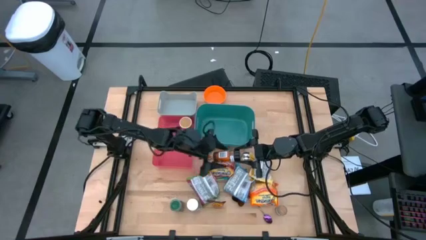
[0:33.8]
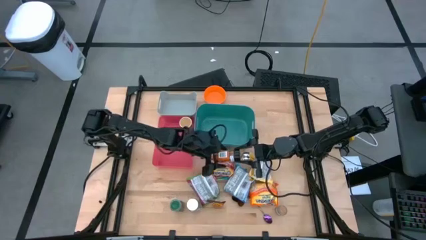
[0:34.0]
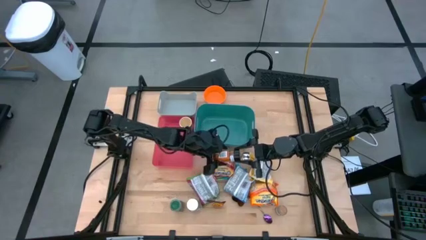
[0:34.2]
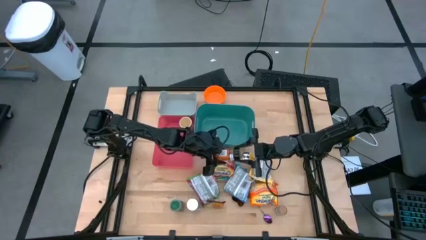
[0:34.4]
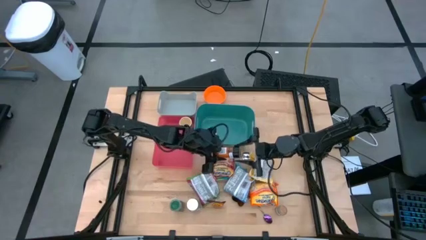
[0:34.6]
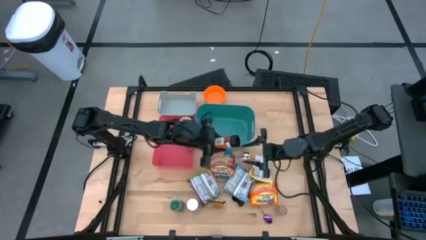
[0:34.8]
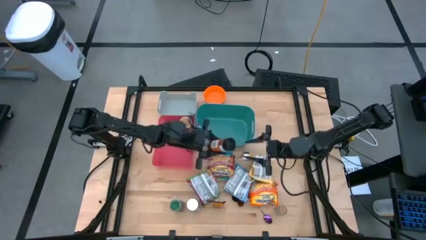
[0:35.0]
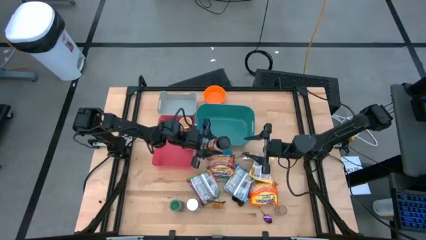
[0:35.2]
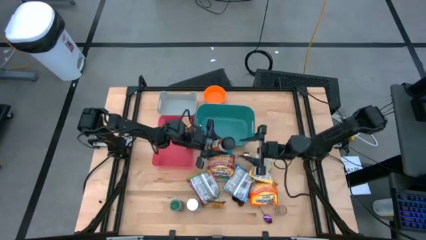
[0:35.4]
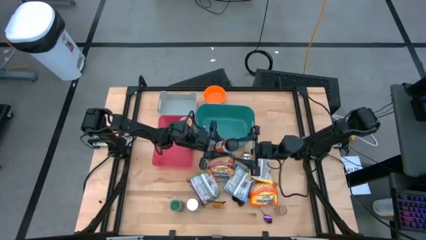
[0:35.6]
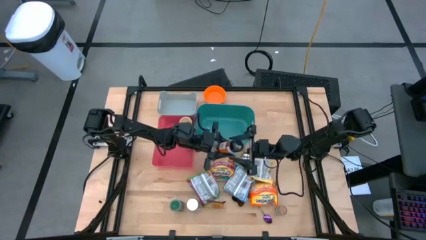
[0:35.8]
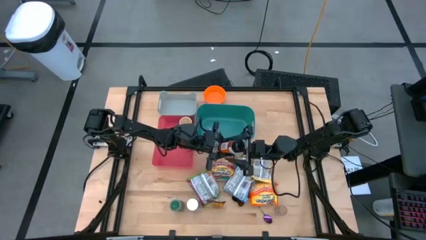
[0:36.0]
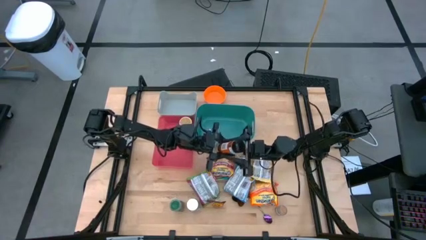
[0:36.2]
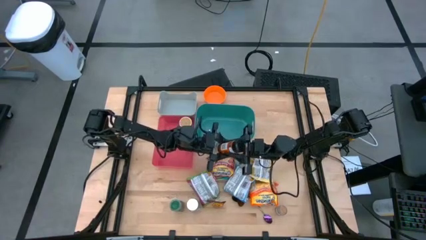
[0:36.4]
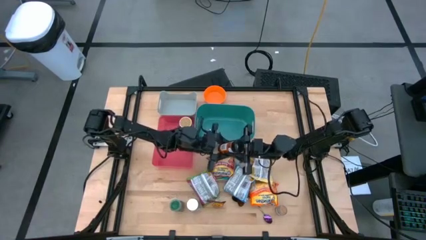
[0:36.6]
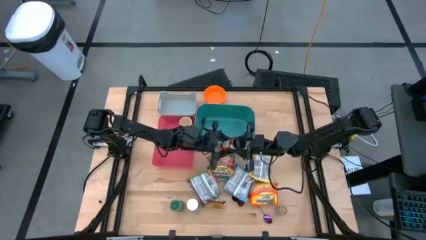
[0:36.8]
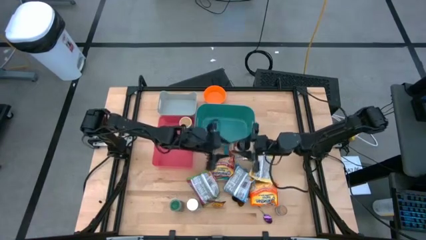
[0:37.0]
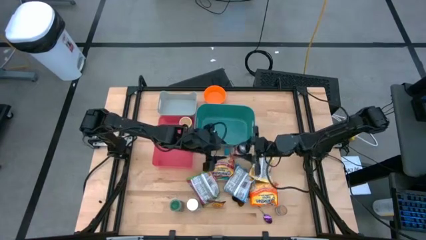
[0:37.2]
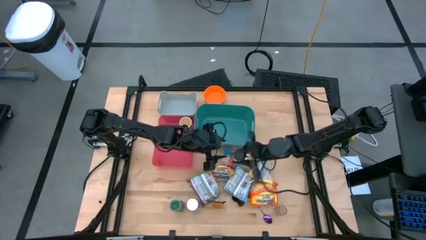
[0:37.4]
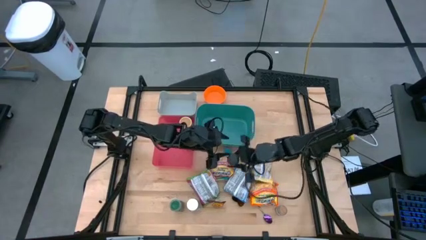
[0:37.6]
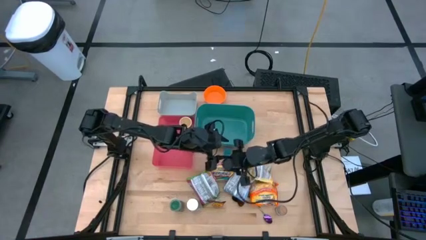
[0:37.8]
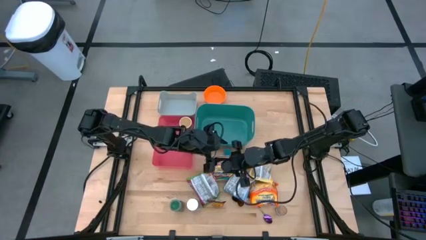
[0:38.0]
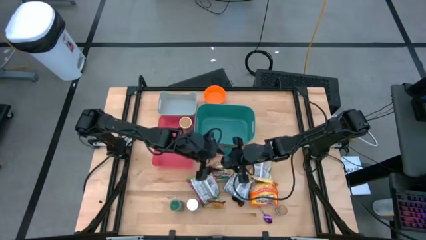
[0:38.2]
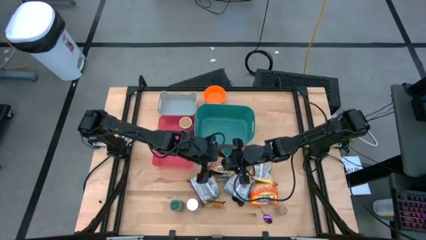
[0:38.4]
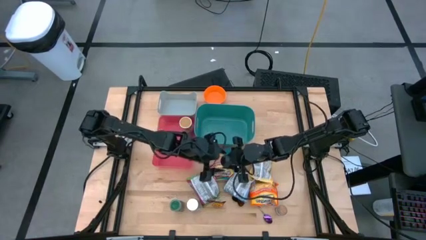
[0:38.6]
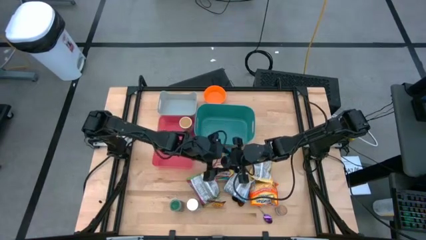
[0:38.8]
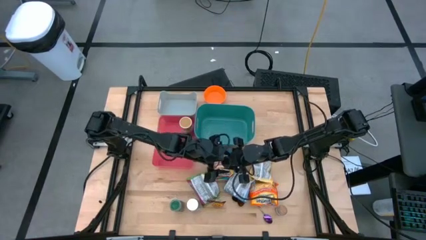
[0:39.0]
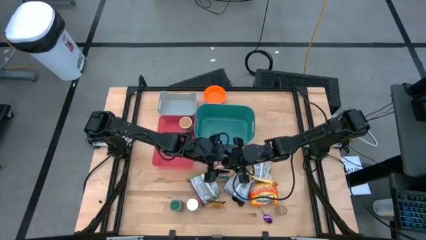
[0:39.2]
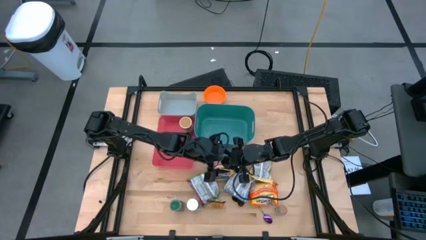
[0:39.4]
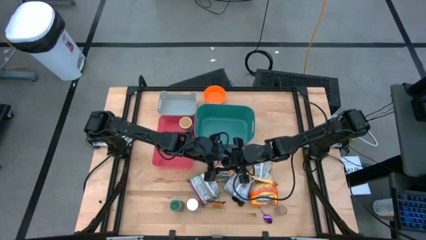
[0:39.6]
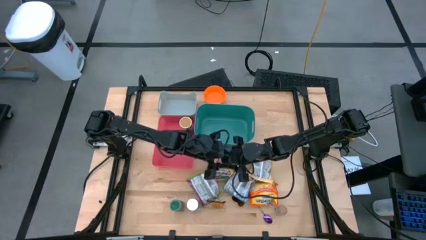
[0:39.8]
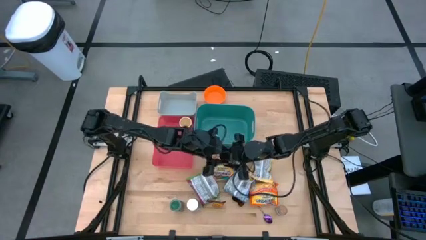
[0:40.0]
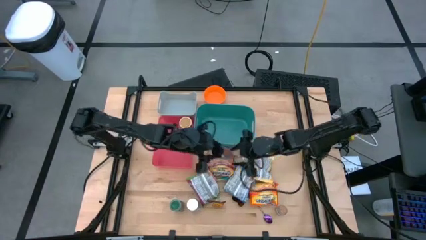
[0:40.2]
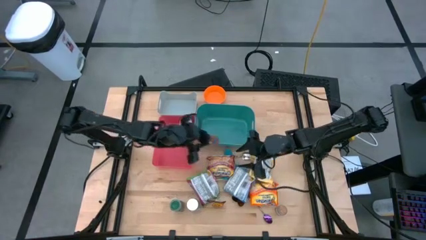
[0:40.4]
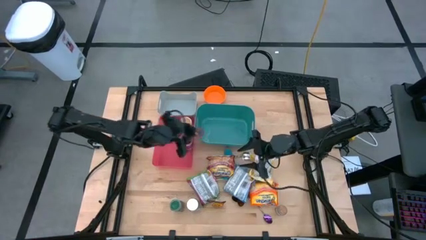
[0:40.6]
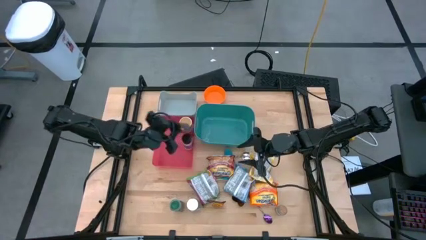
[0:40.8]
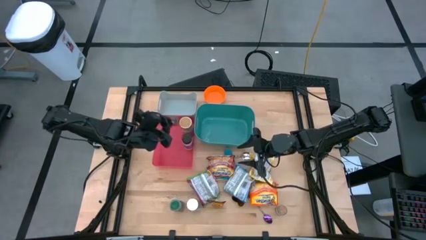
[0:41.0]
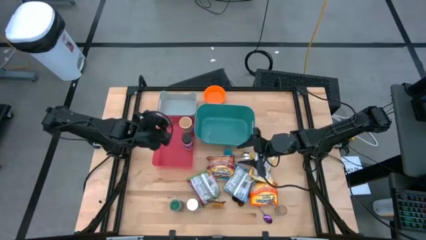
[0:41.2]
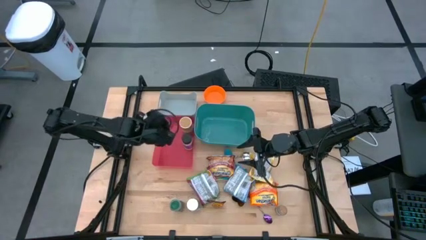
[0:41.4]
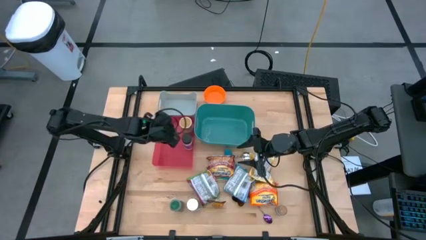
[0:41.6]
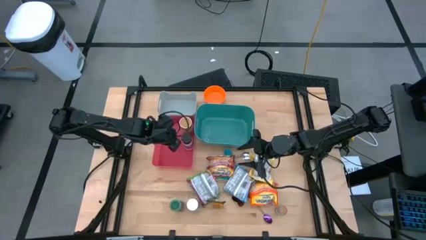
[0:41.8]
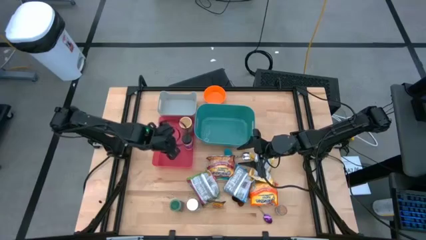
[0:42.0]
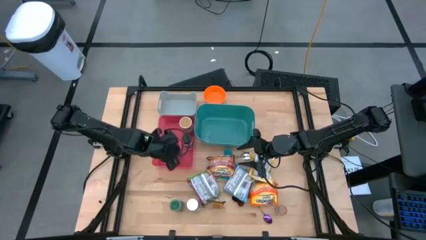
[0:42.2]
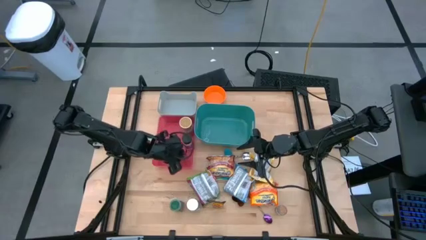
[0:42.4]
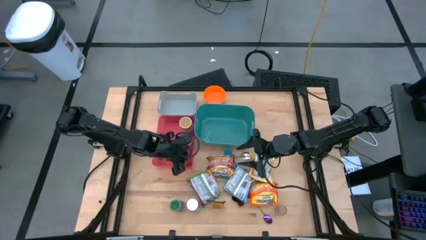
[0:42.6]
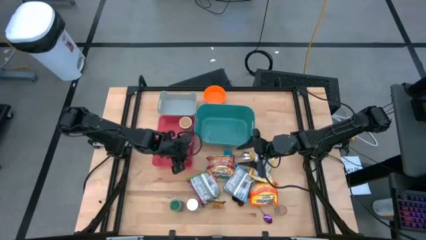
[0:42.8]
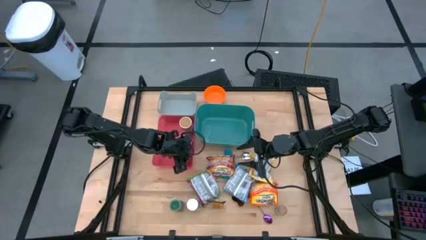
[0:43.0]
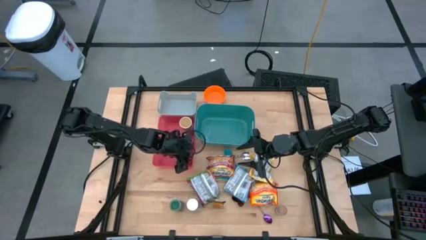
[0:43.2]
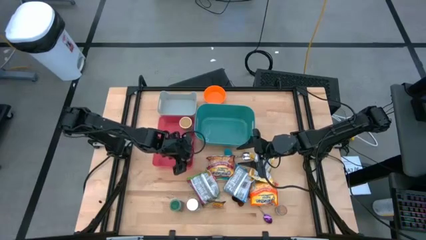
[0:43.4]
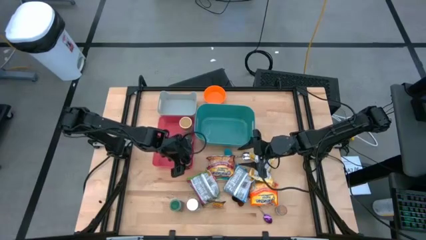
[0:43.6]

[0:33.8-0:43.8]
Task: Pick & Place Food Item
Put the orange spice bottle into the red bin

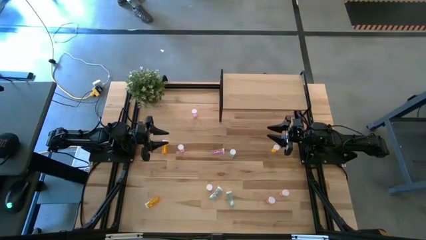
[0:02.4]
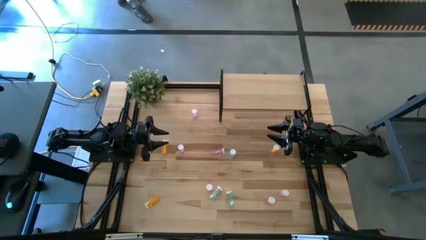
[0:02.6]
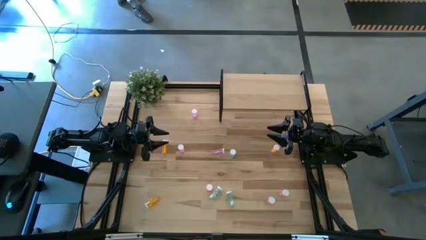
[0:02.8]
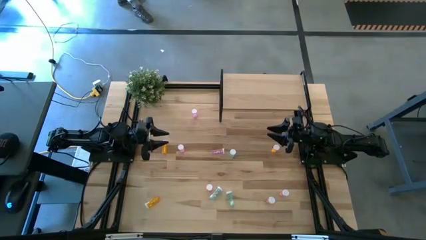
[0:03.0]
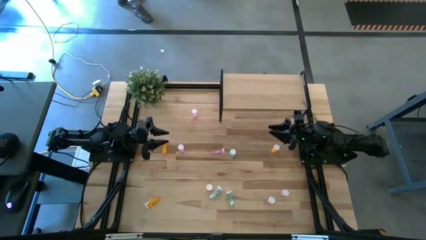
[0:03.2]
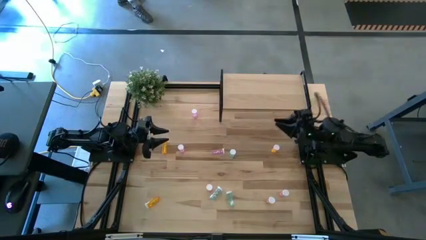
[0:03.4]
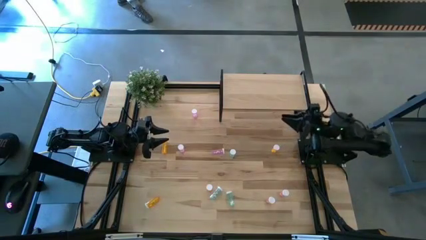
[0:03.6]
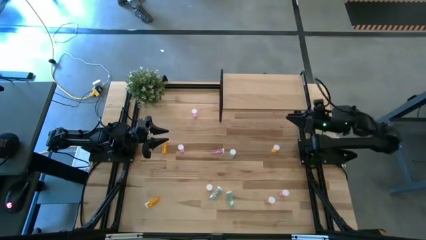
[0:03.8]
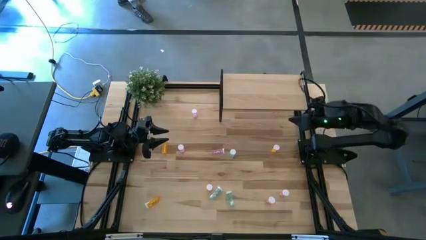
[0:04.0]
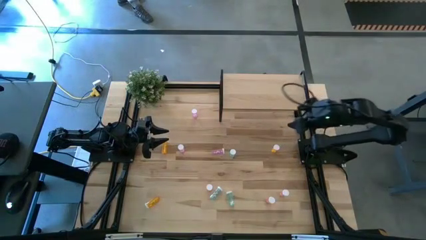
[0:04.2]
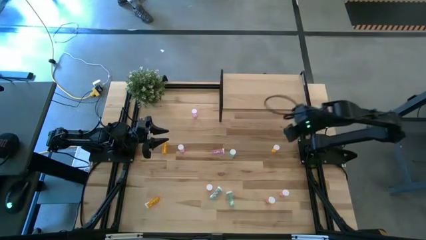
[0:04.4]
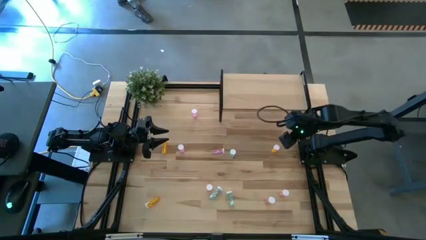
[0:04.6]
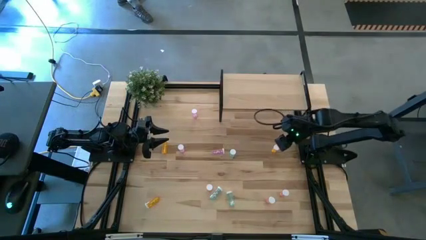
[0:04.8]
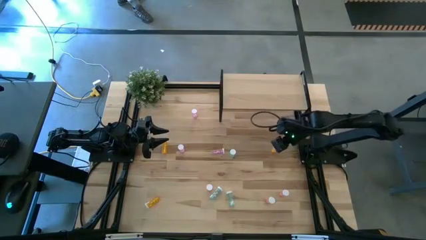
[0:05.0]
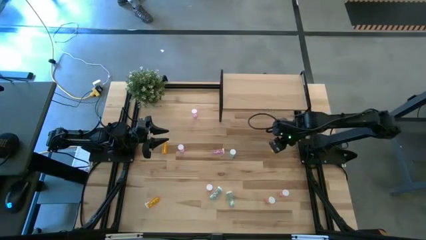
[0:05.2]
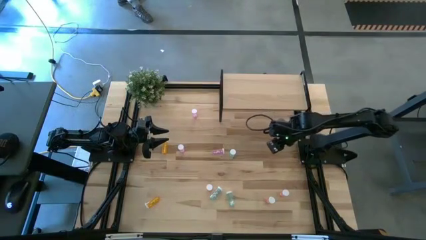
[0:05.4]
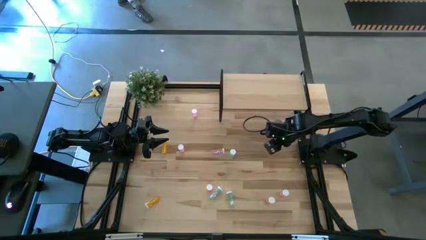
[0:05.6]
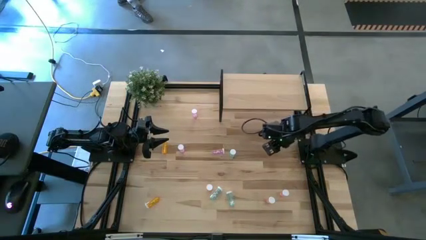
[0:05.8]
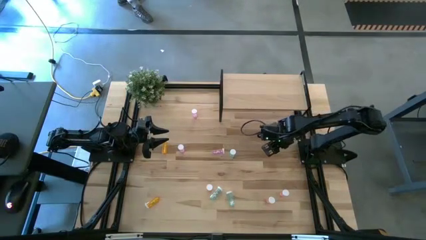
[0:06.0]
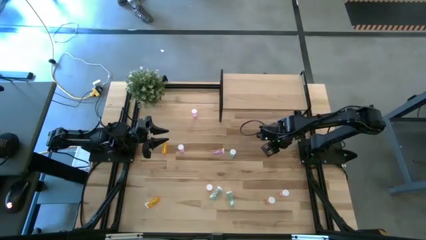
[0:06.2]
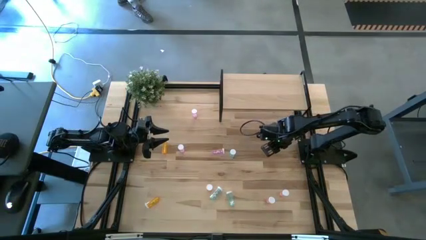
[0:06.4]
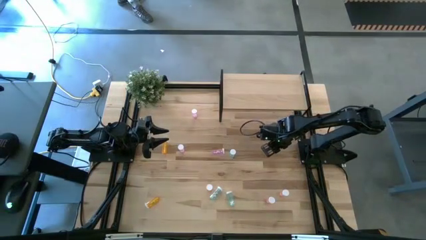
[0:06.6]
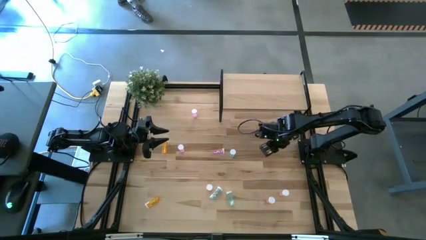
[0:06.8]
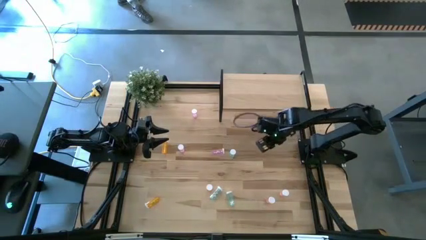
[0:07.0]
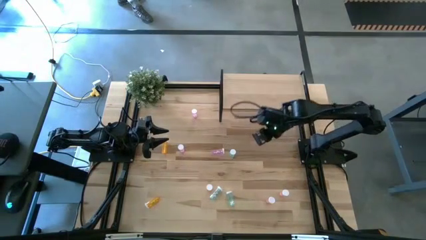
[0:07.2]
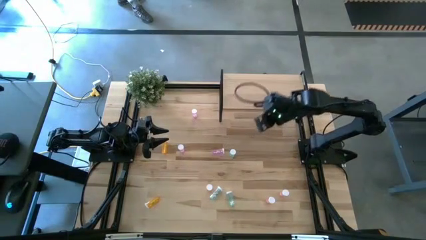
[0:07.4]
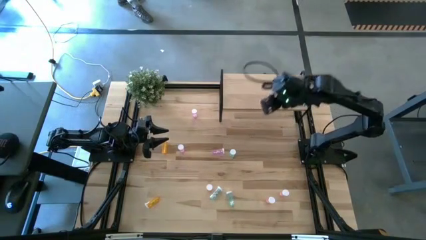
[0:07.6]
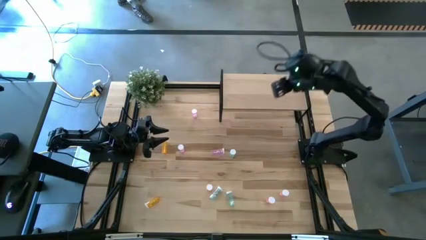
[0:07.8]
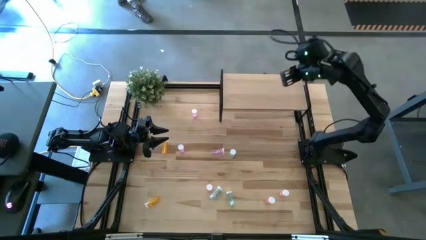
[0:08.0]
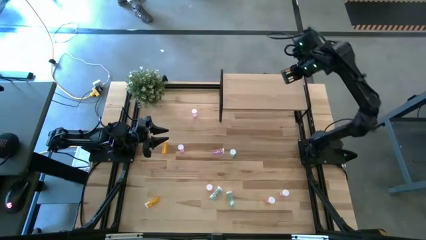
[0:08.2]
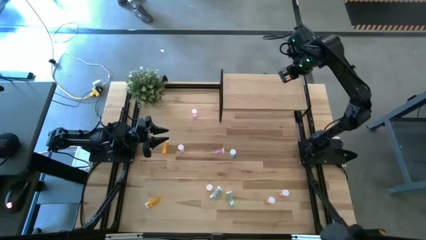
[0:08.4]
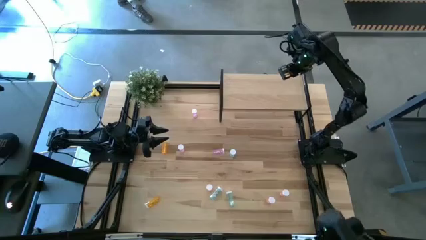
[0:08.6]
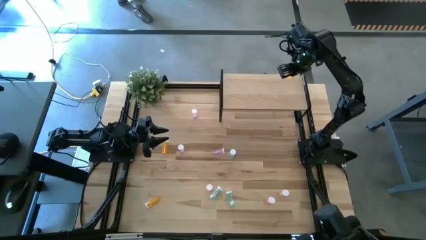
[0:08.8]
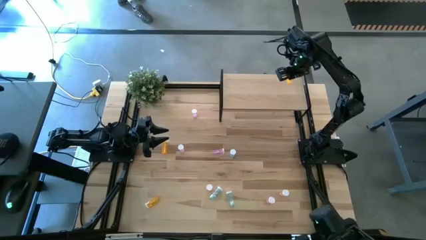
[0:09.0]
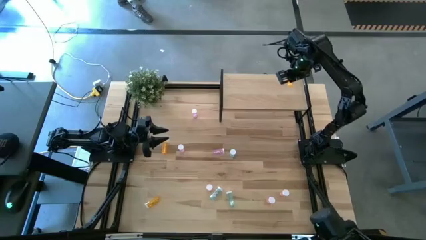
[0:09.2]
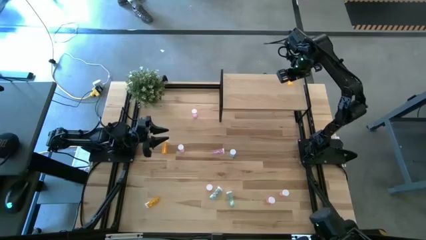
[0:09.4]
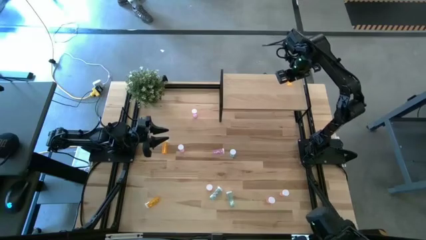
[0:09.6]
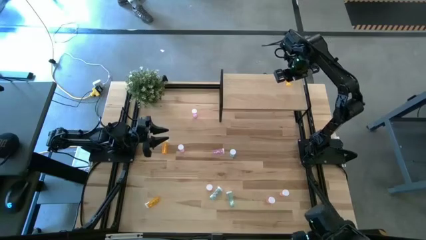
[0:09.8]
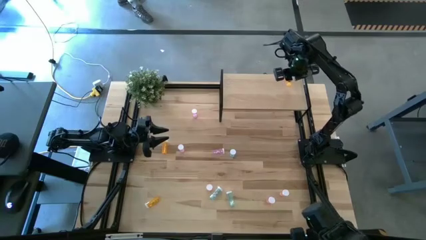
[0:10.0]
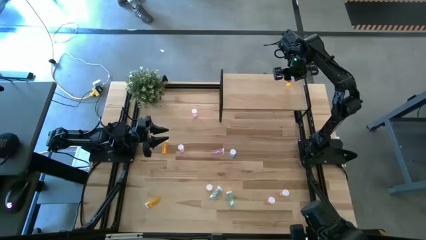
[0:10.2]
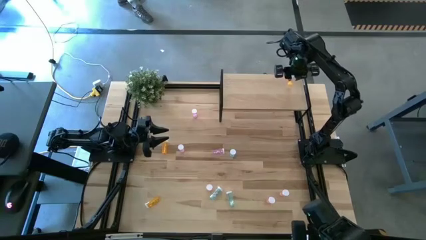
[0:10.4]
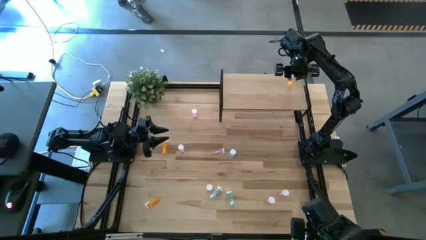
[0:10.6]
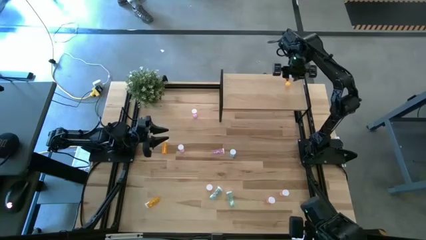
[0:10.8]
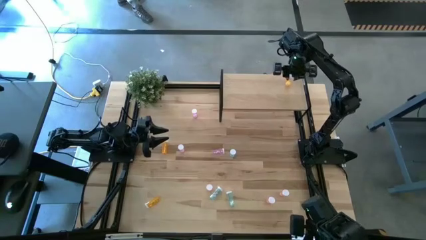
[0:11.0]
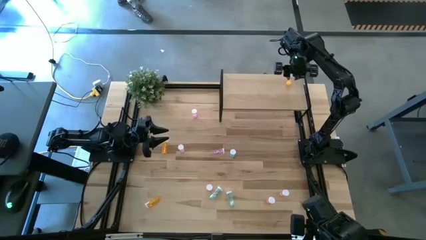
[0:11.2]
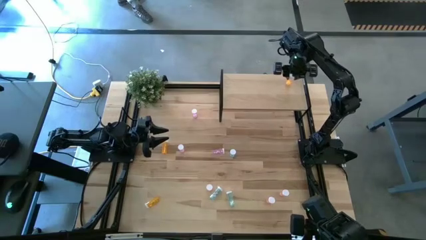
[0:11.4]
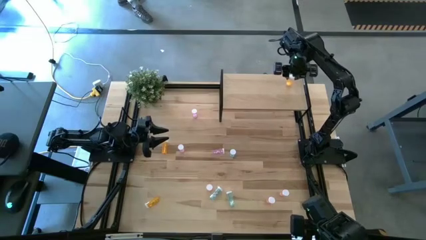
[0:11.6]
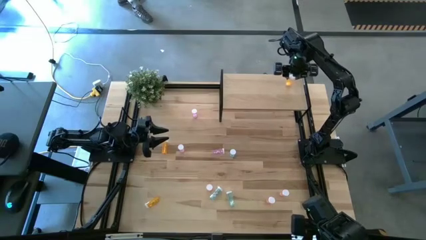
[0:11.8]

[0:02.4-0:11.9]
Task: Pick and place medicine bottles onto shelf by color
Put the right orange pill bottle on the shelf
